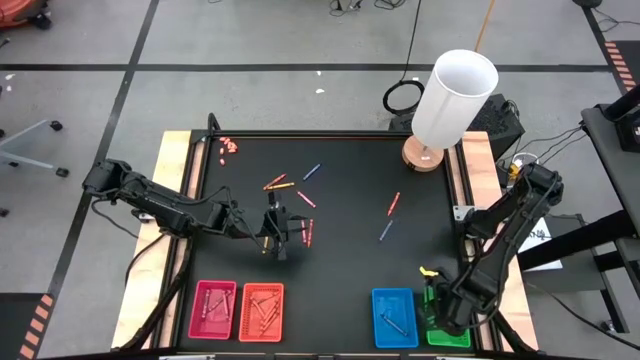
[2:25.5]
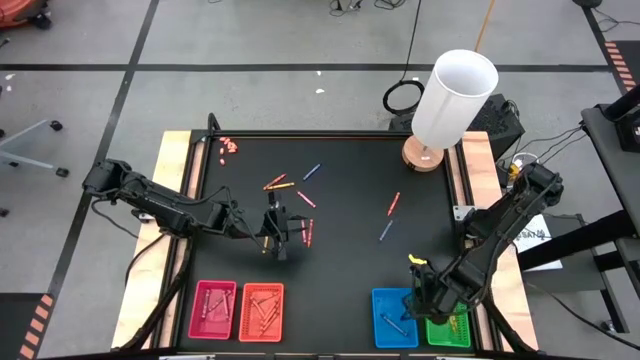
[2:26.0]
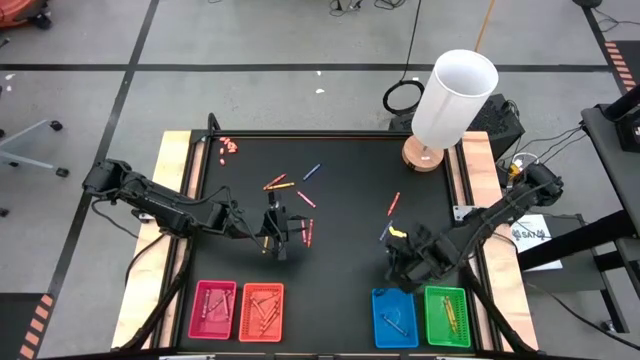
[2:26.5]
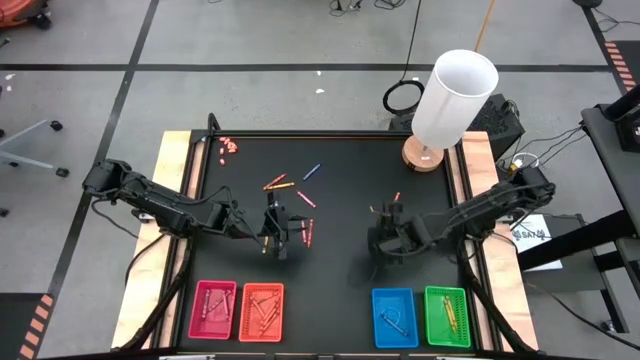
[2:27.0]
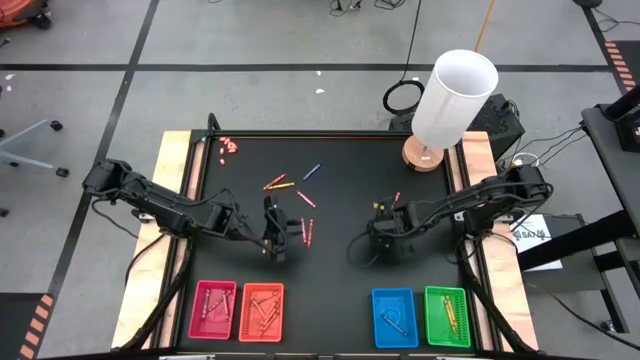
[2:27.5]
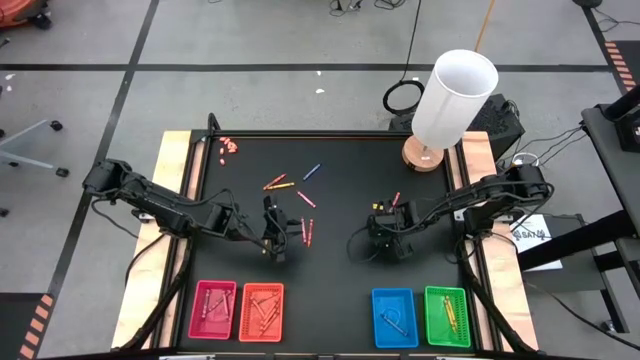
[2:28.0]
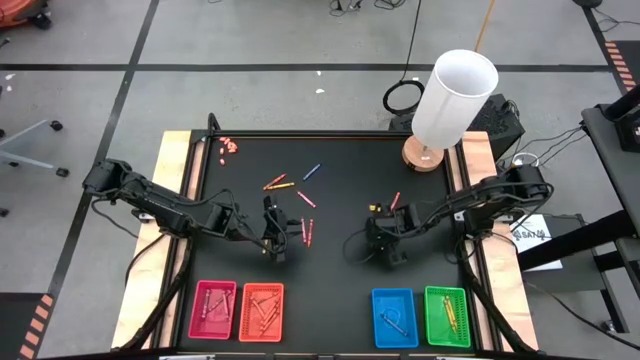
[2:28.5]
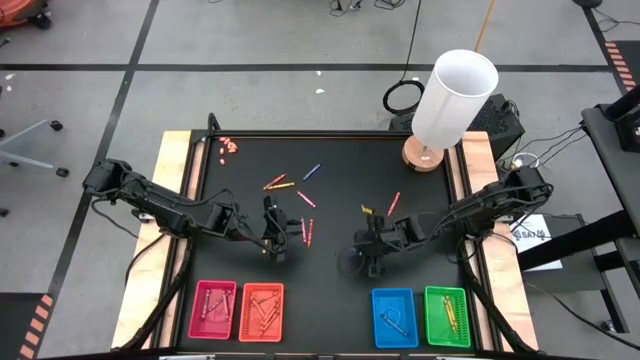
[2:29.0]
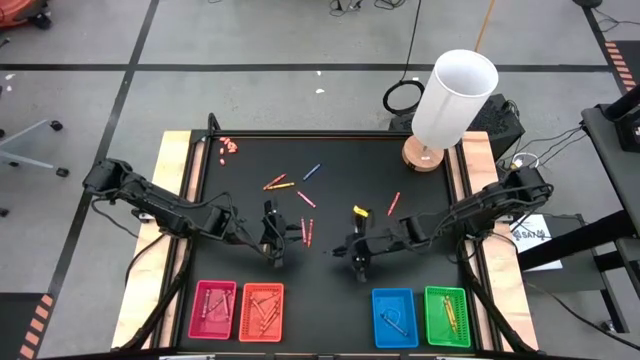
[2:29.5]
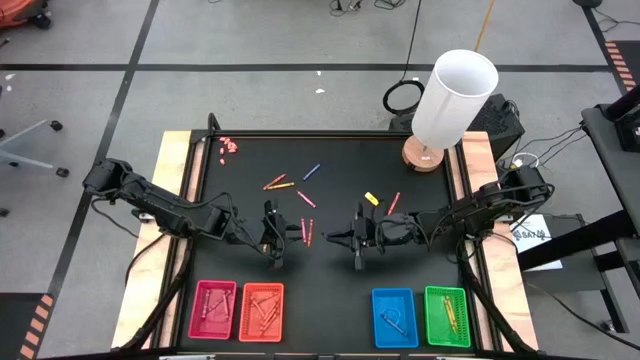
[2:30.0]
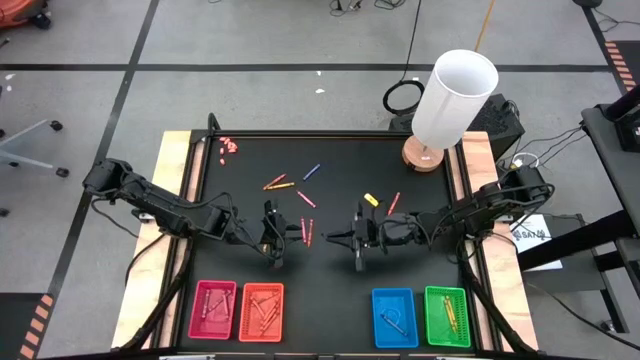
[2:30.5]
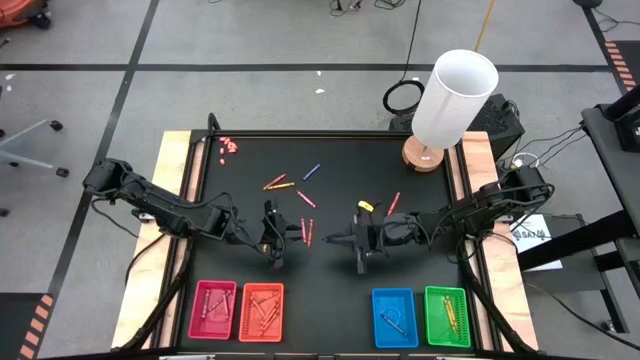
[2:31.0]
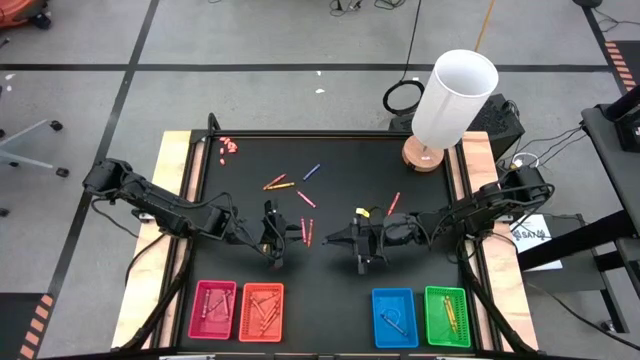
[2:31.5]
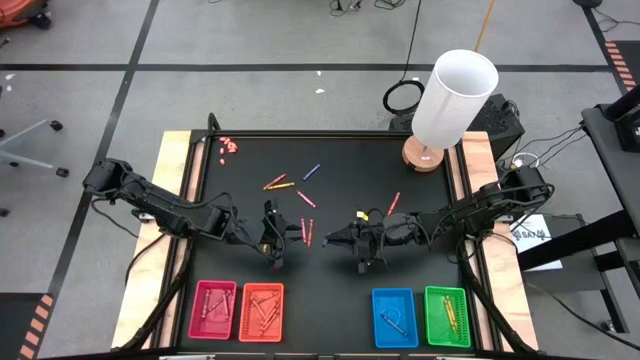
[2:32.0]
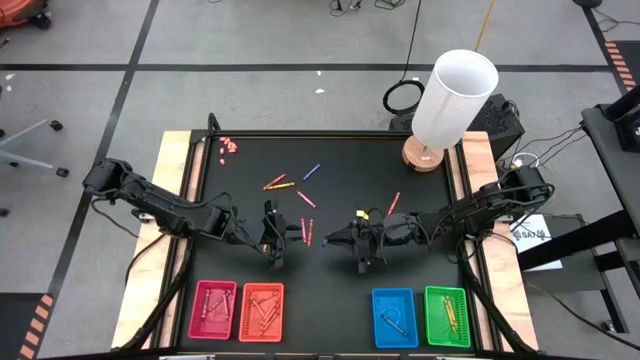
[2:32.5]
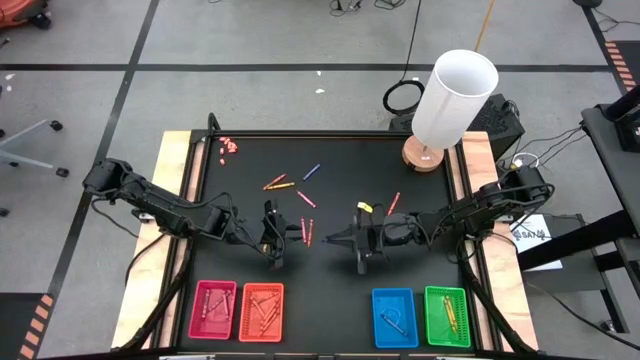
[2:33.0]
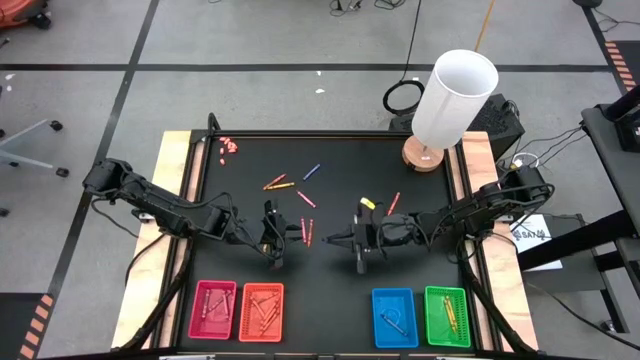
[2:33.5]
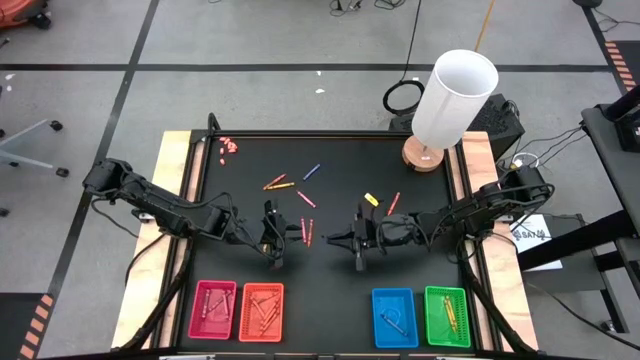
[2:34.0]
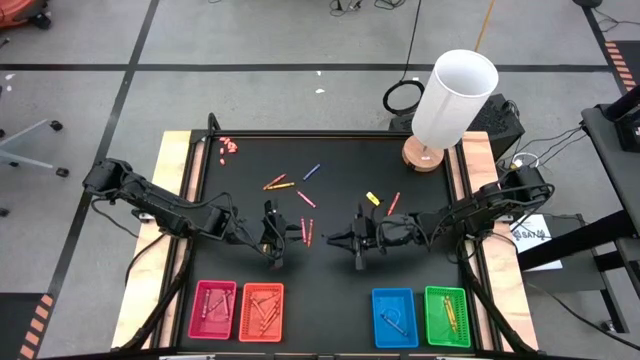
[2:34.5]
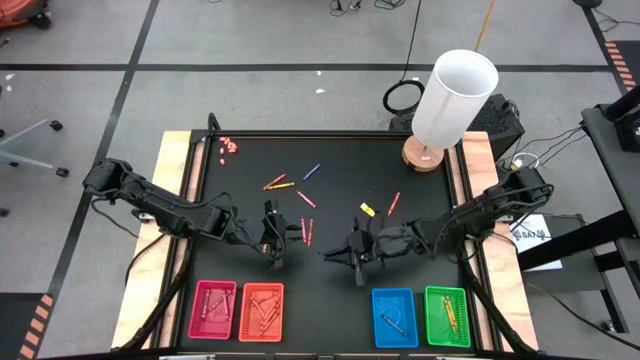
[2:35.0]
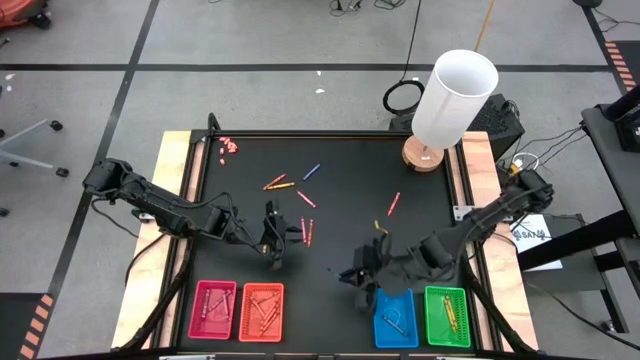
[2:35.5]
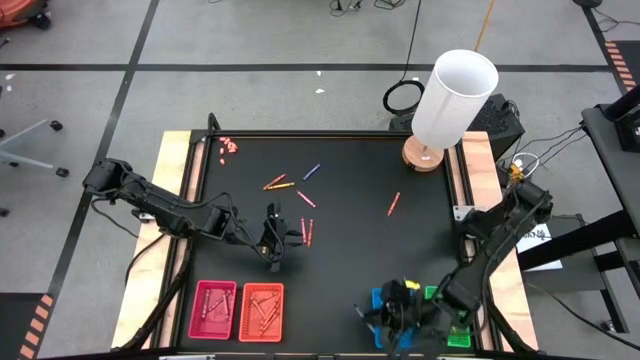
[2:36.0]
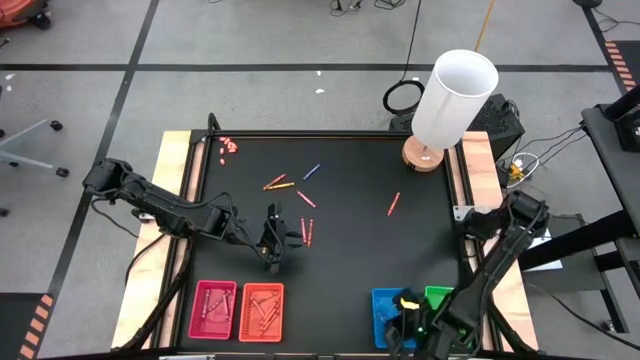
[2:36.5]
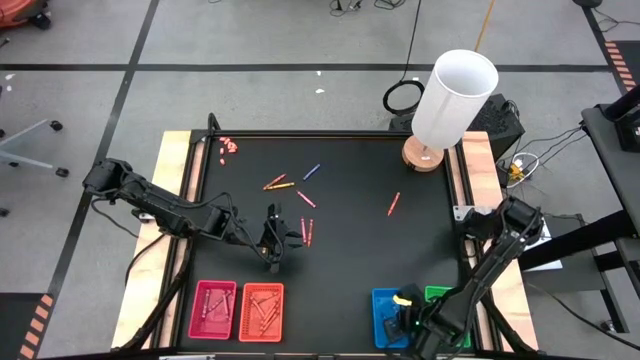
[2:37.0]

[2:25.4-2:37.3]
Task: Sort crayons
Put the blue crayon into the blue bin

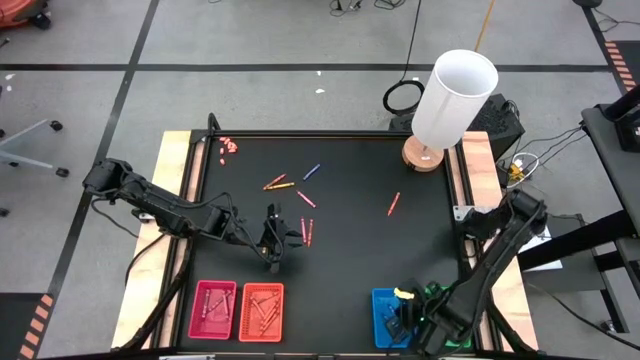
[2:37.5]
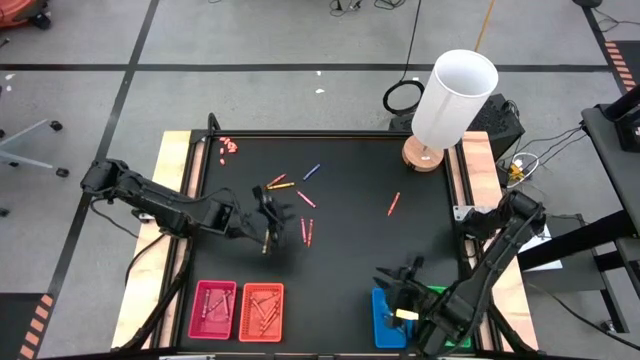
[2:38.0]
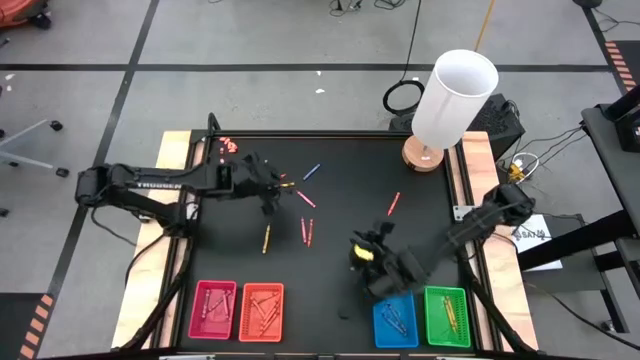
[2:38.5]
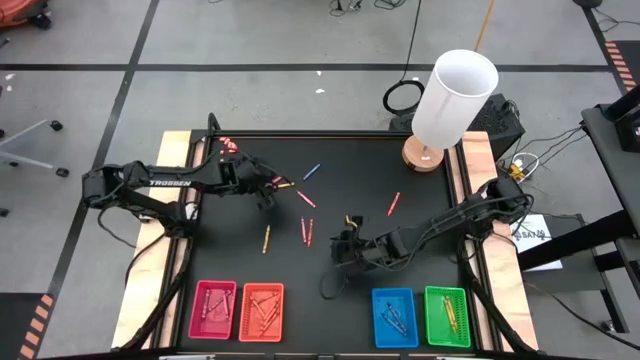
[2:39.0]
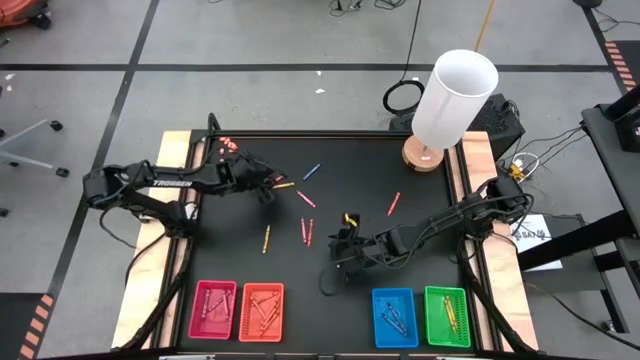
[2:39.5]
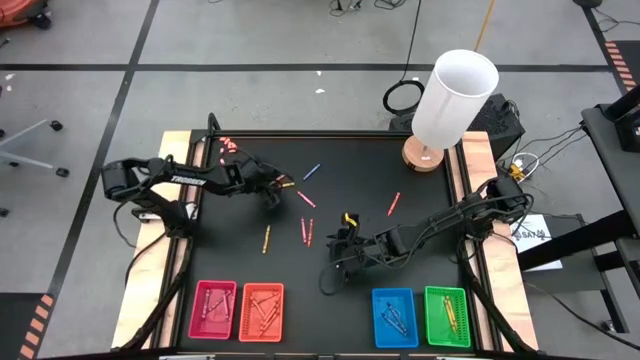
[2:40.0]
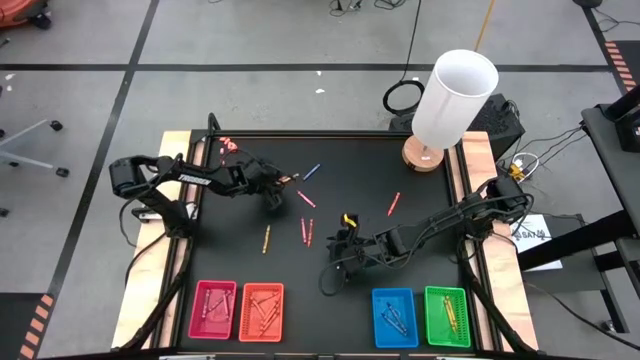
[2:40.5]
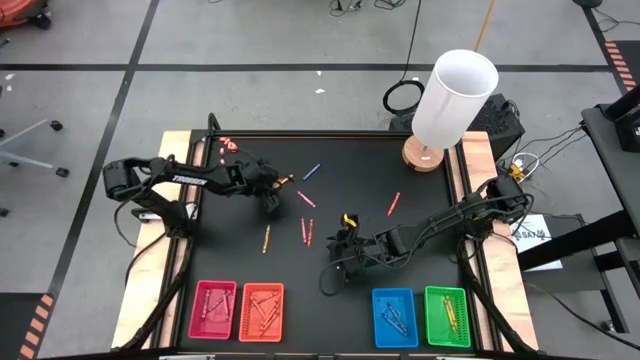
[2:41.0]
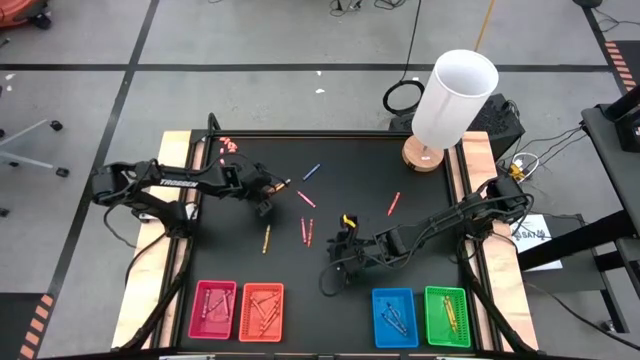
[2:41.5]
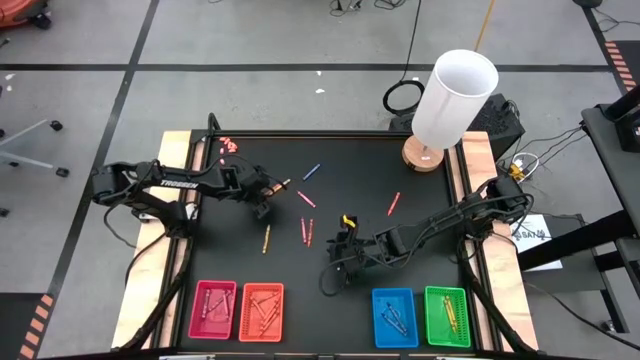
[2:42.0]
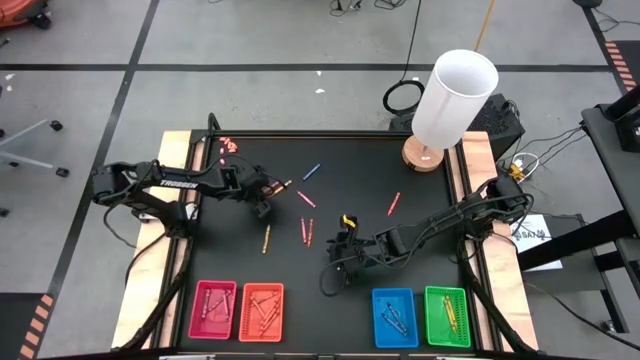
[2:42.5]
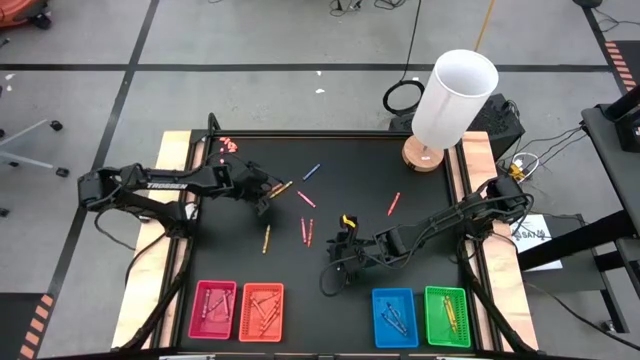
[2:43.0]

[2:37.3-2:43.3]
Put the orange crayon into the orange bin

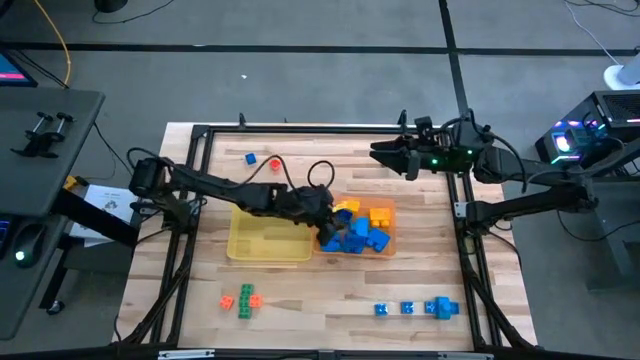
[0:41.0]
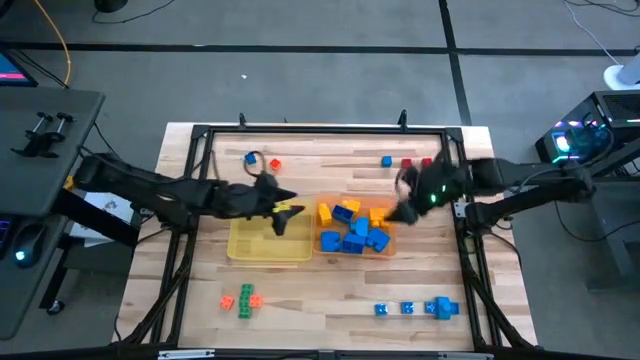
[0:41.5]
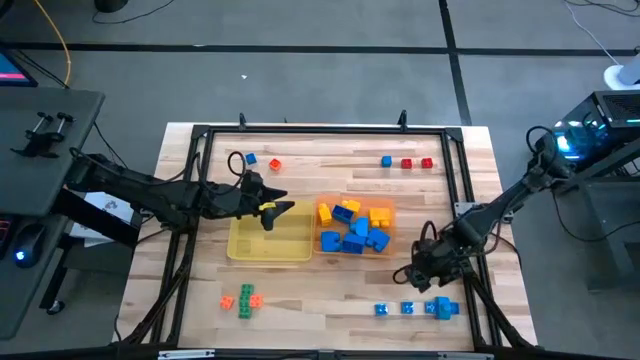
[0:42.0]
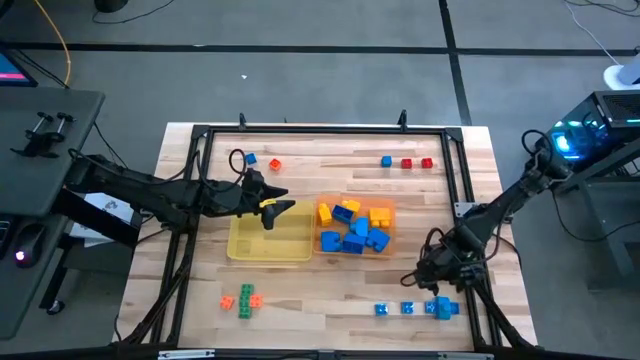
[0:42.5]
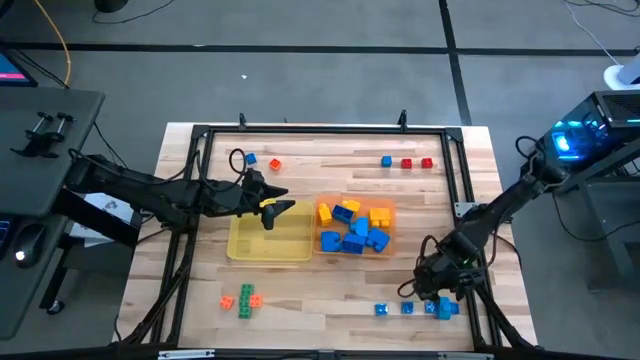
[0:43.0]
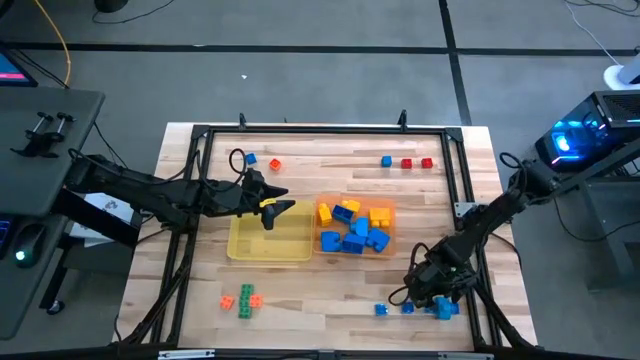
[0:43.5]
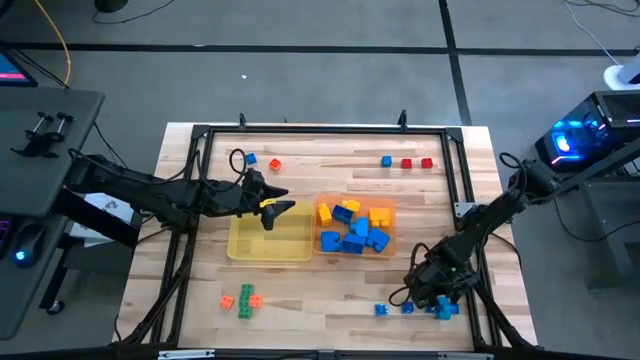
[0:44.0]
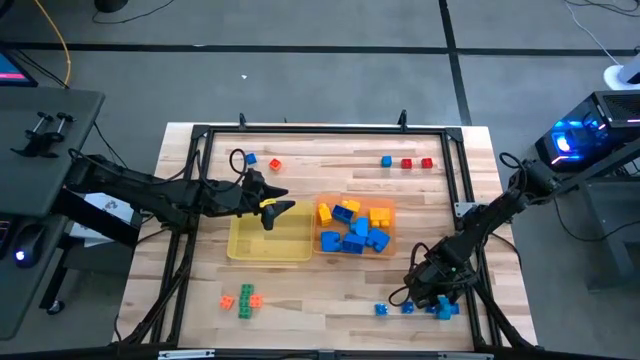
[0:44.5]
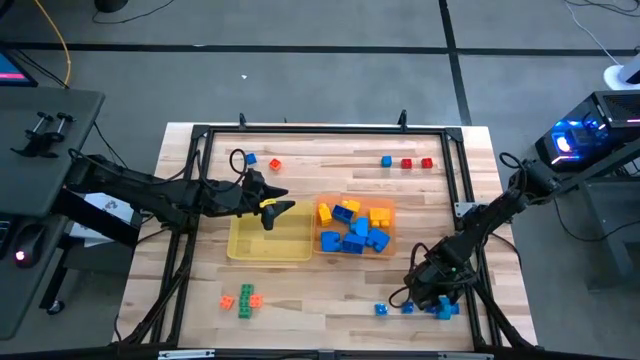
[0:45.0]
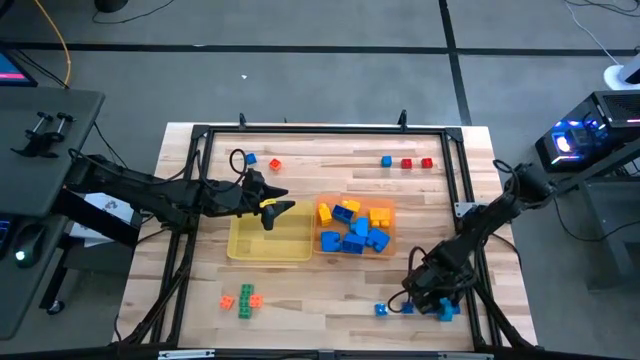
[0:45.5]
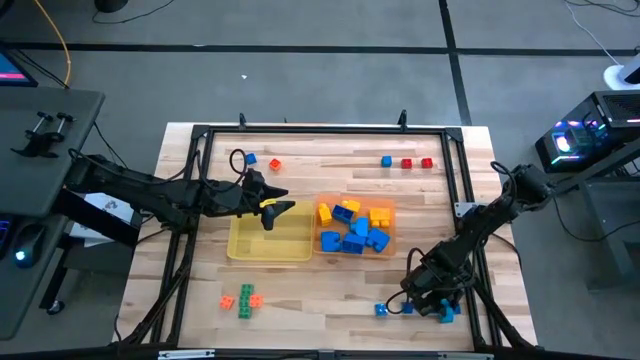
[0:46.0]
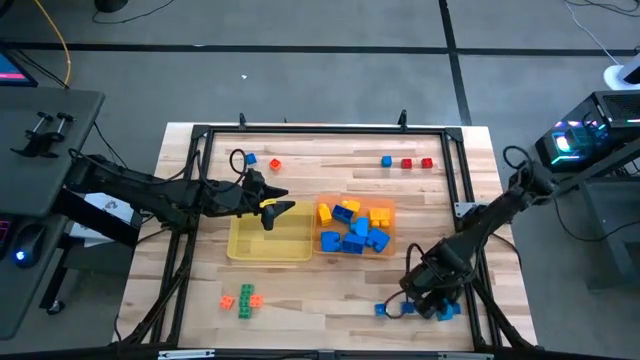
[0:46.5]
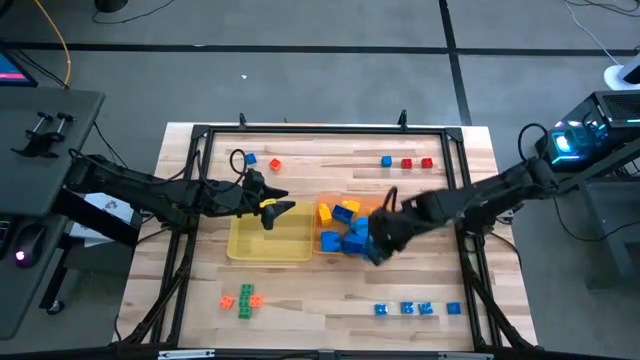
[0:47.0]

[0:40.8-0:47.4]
Task: Sort blocks by size
Put the large blue game piece into the orange bin
